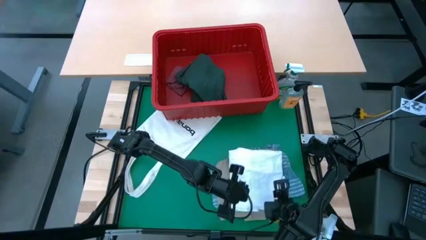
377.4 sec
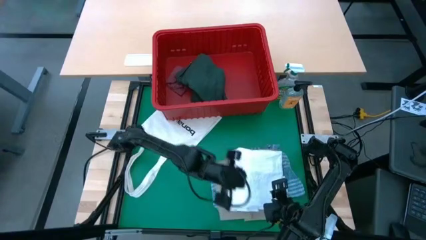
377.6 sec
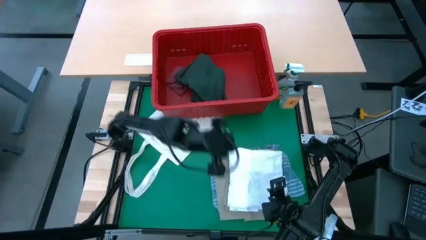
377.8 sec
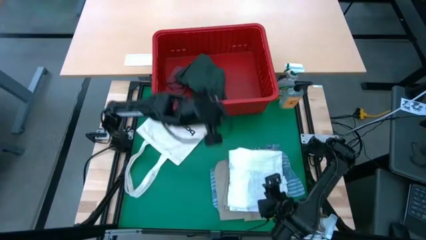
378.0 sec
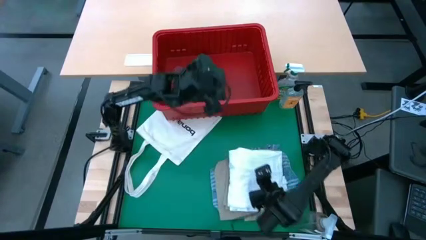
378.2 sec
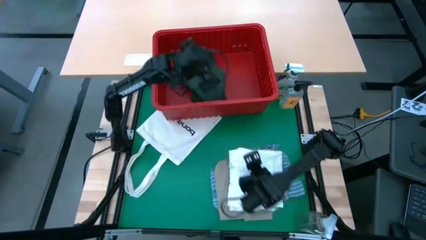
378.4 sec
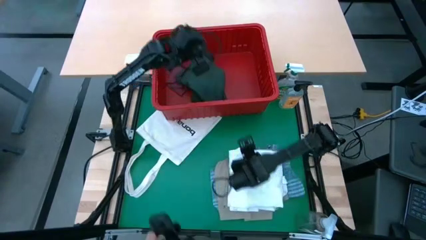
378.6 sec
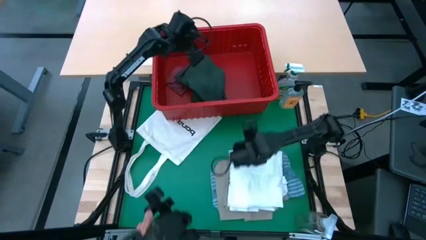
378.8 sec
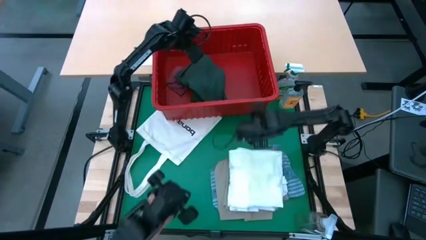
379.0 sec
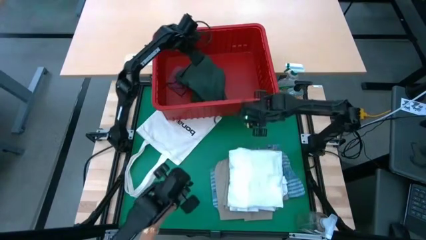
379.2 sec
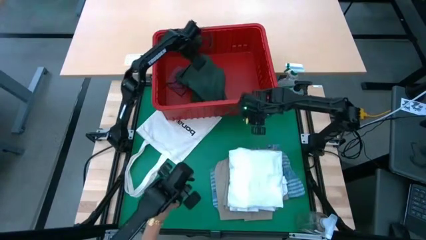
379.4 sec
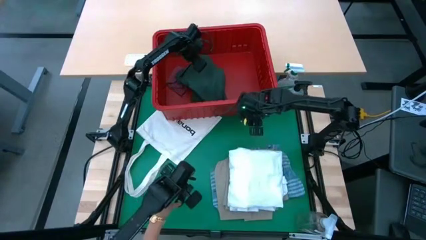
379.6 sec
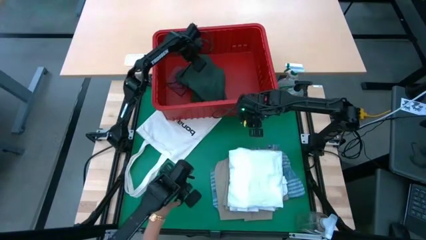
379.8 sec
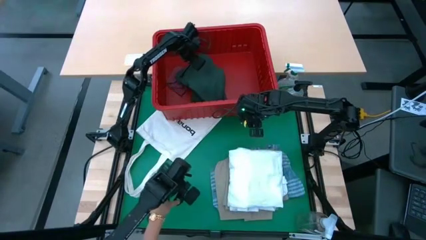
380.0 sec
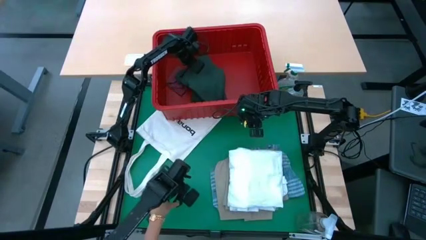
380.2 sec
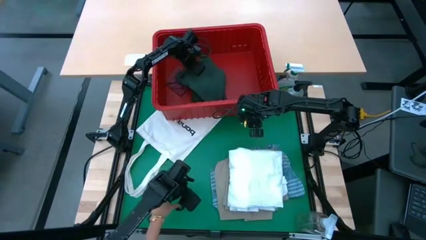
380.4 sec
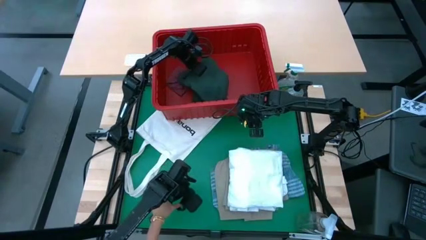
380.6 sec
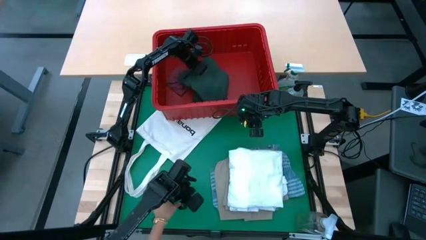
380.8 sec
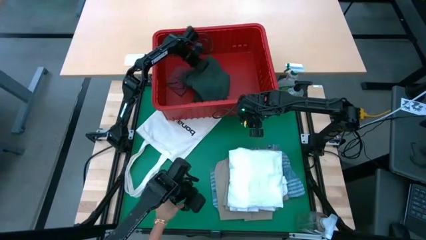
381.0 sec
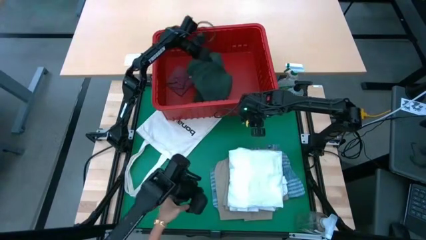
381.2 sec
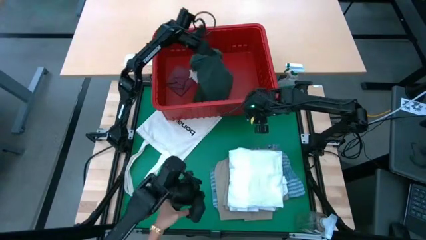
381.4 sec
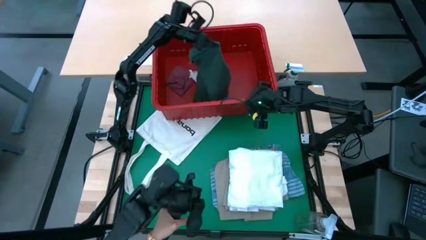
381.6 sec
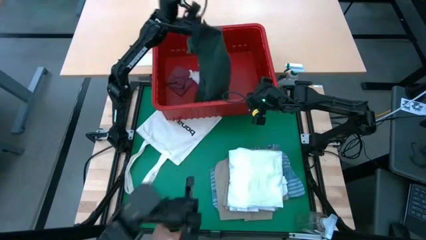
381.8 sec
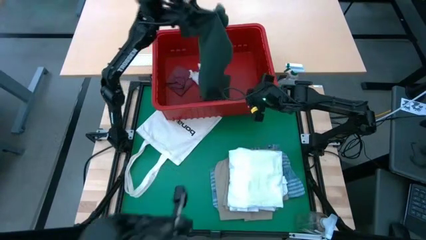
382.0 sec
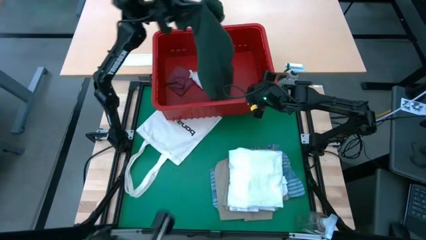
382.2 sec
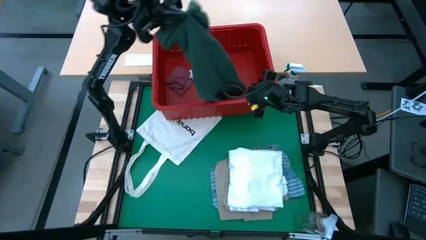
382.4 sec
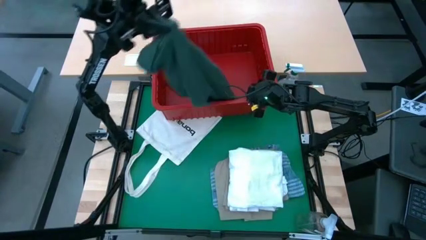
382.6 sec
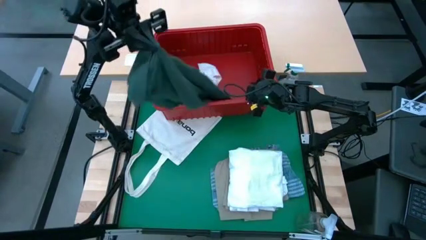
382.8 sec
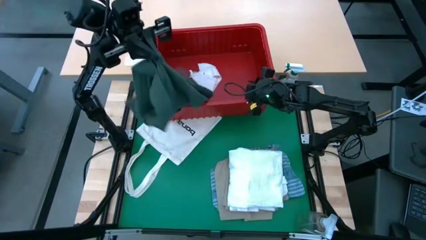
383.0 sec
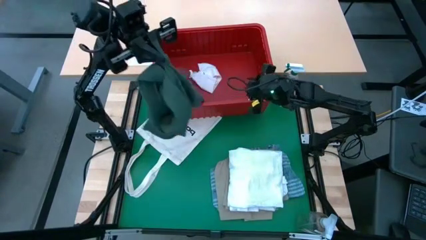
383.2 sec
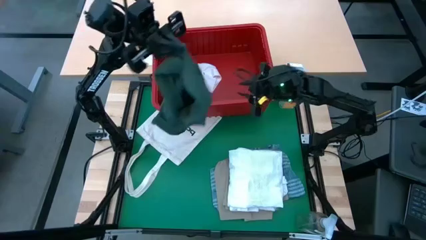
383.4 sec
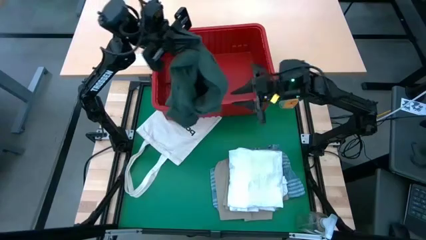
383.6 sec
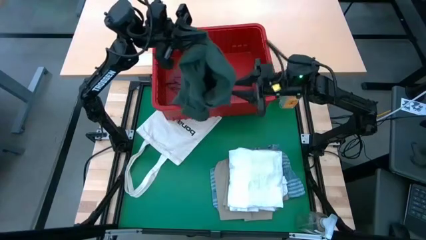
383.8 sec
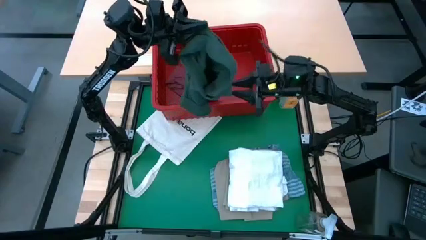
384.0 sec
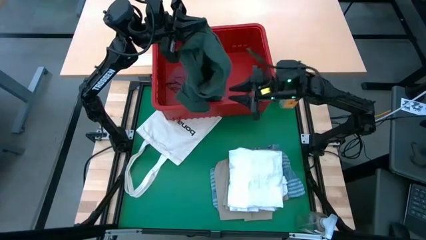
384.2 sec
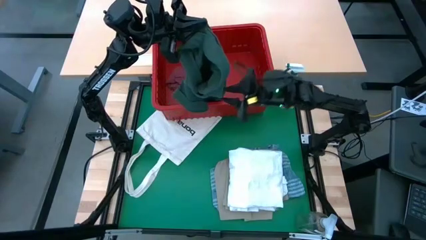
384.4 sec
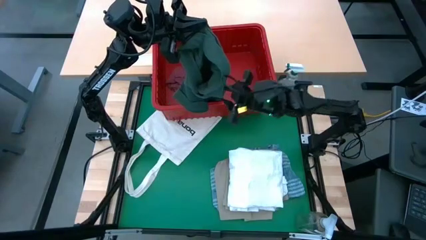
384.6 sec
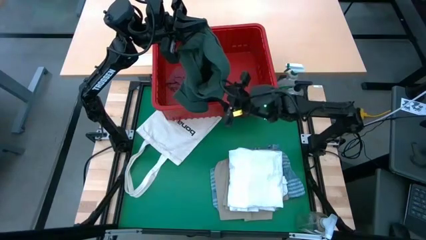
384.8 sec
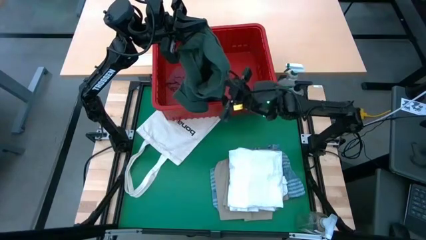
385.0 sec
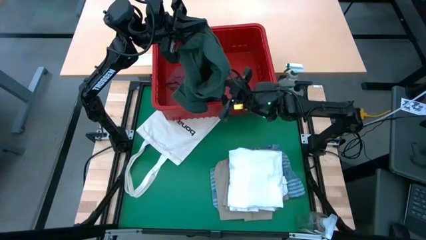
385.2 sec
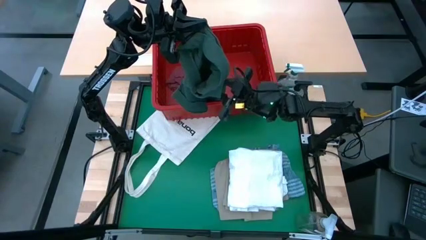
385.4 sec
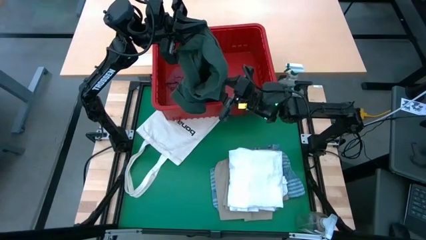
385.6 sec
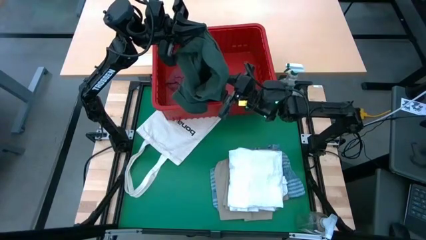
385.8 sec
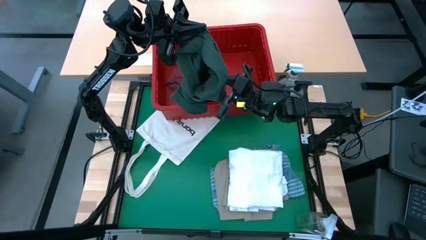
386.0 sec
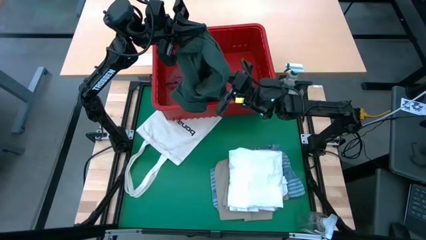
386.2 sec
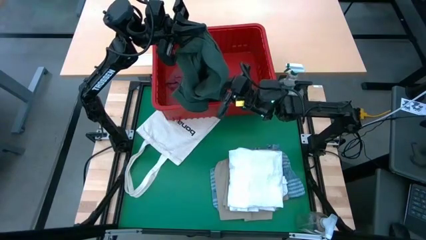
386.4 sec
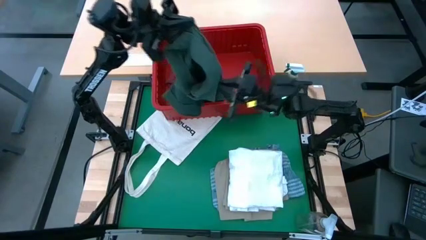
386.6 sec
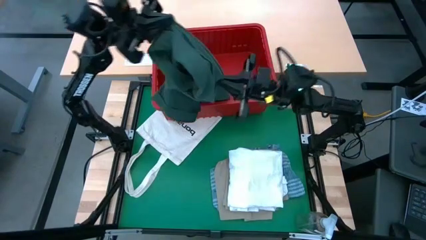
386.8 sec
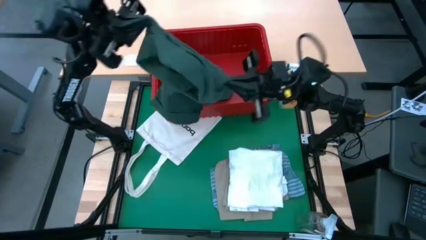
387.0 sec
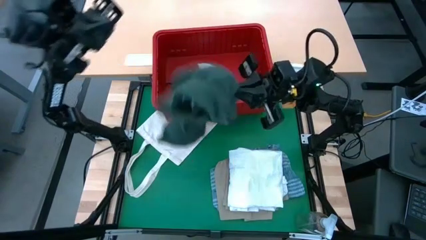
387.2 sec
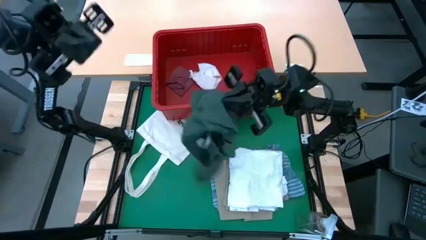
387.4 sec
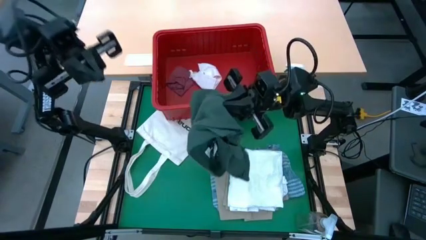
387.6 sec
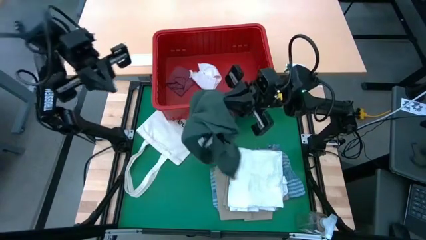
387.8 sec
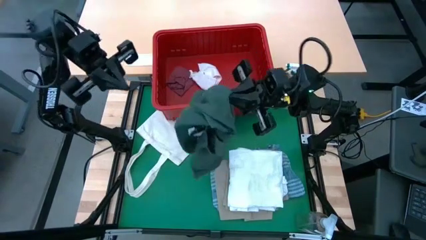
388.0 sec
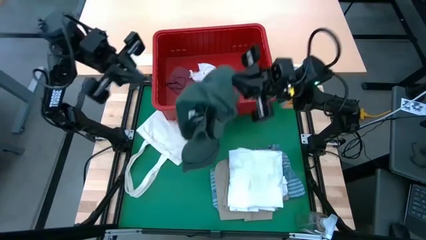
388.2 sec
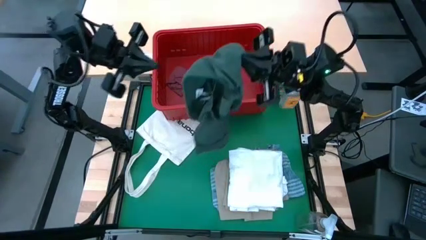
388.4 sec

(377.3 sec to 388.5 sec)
Task: Fold Laundry from Bin
Remove the green shirt from the red bin
